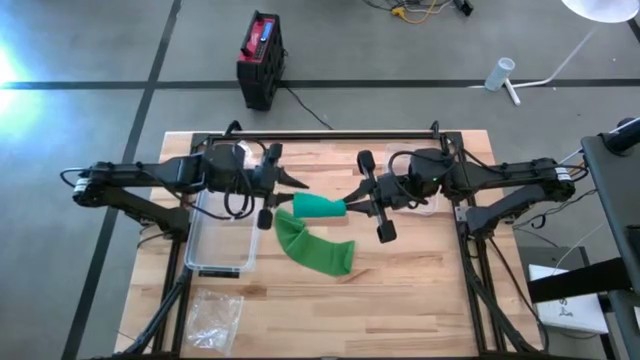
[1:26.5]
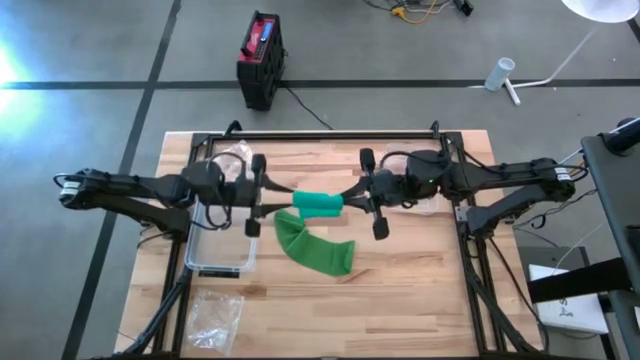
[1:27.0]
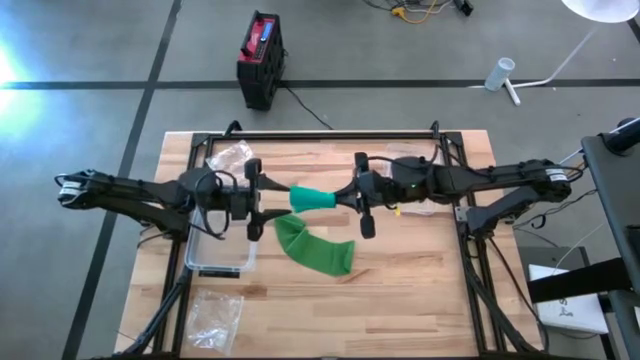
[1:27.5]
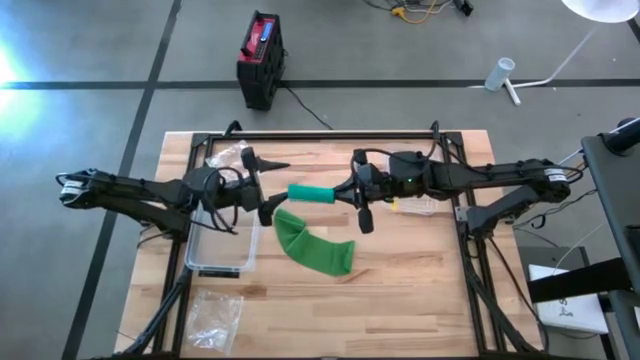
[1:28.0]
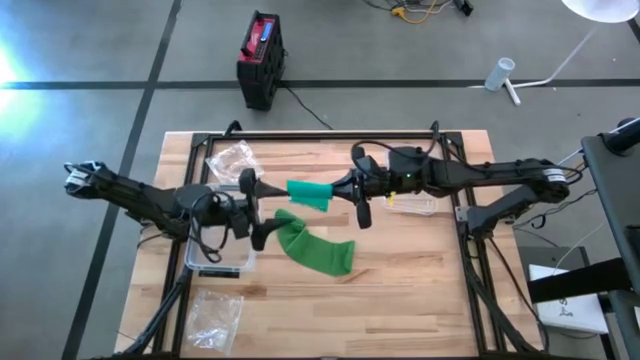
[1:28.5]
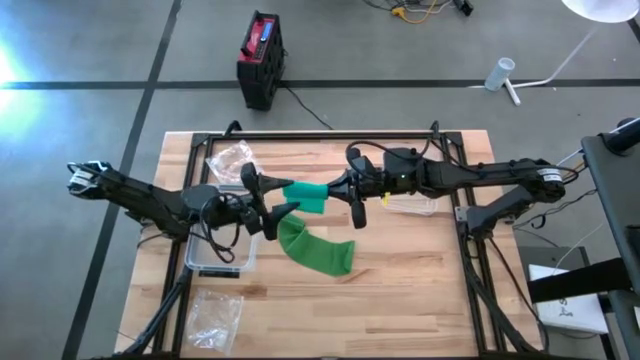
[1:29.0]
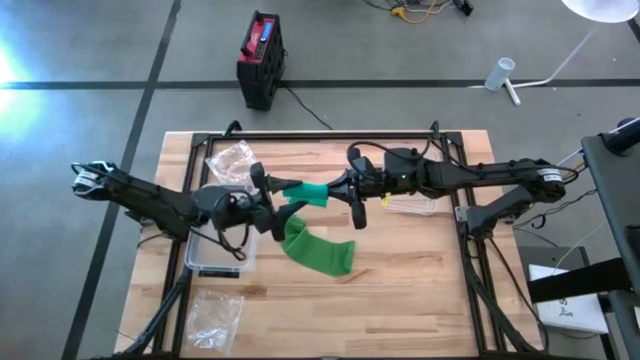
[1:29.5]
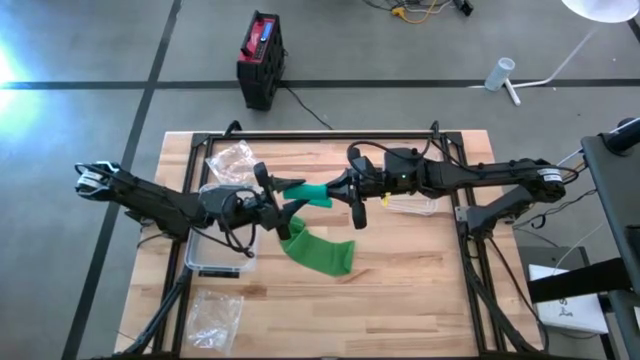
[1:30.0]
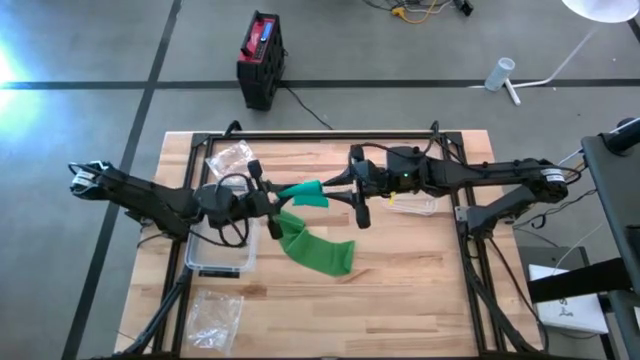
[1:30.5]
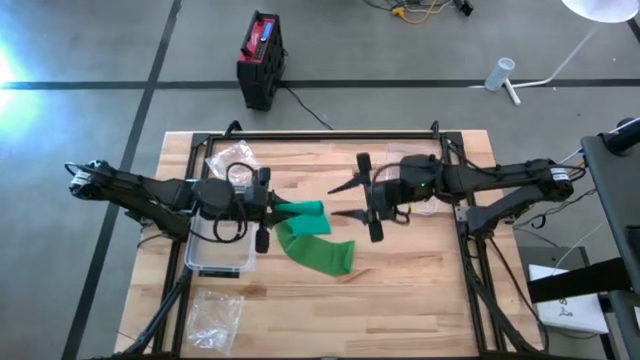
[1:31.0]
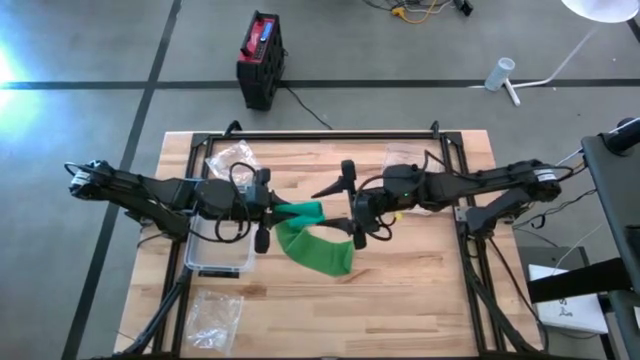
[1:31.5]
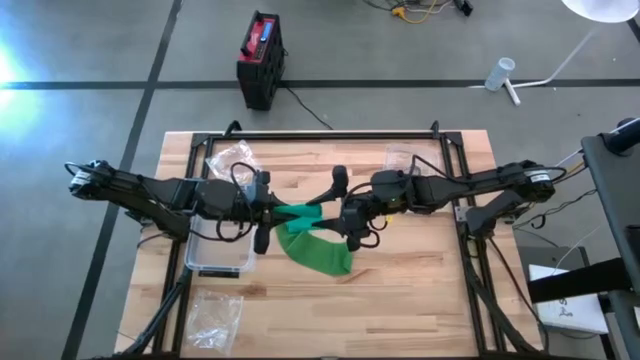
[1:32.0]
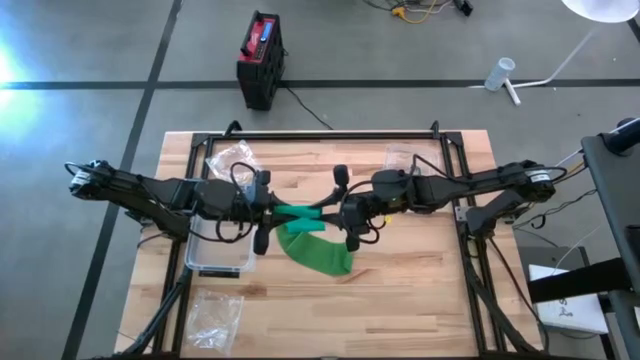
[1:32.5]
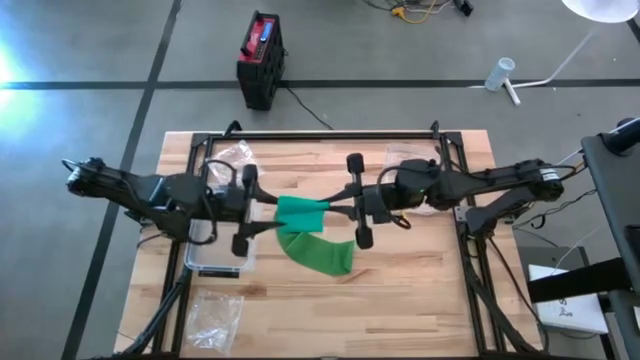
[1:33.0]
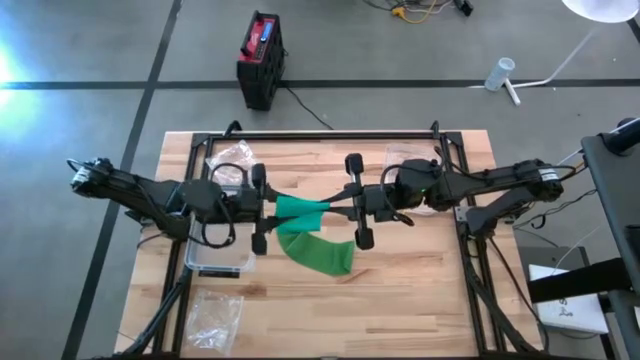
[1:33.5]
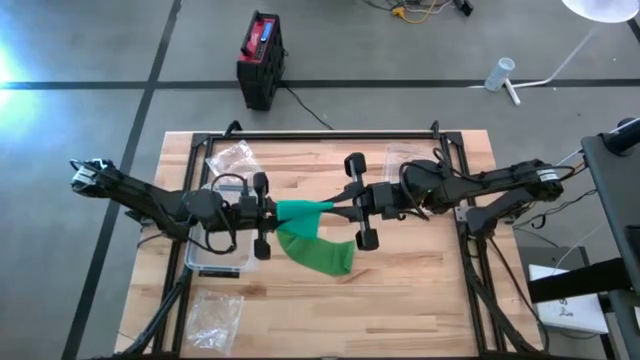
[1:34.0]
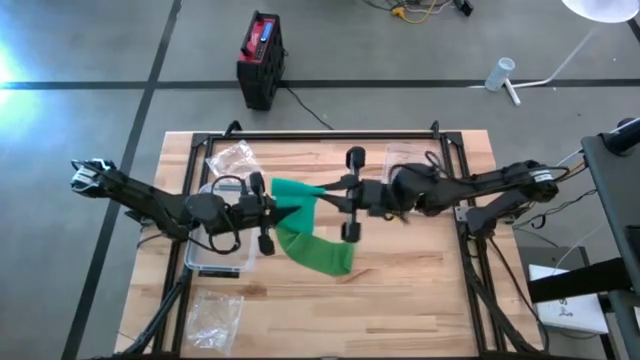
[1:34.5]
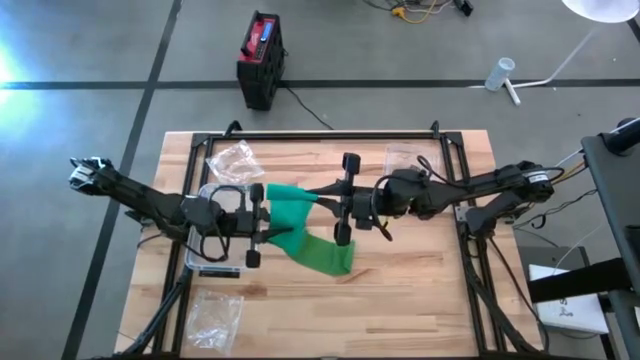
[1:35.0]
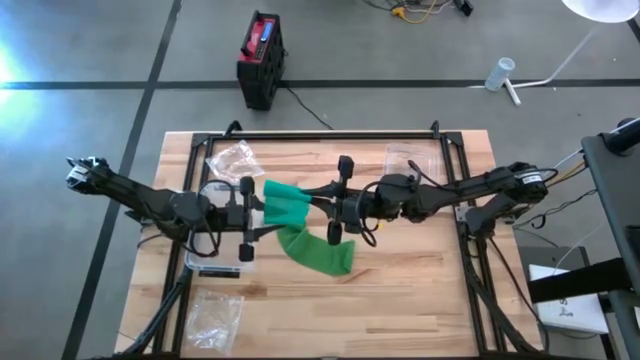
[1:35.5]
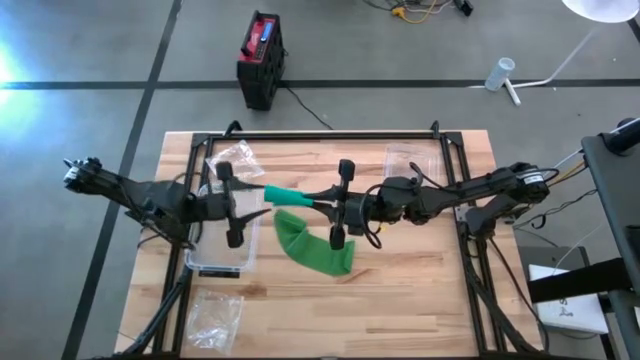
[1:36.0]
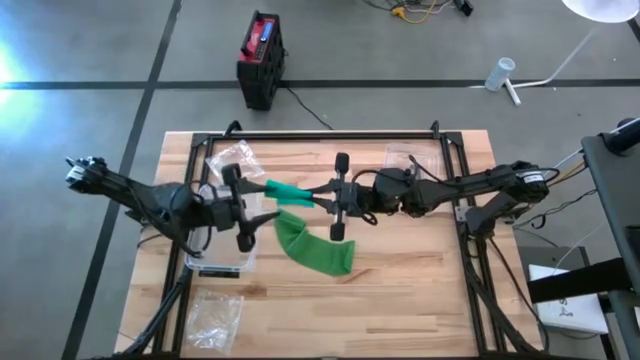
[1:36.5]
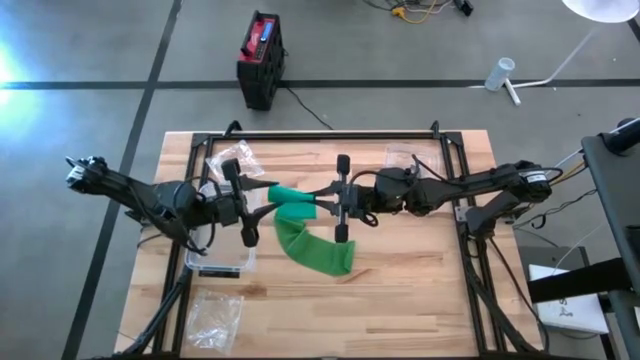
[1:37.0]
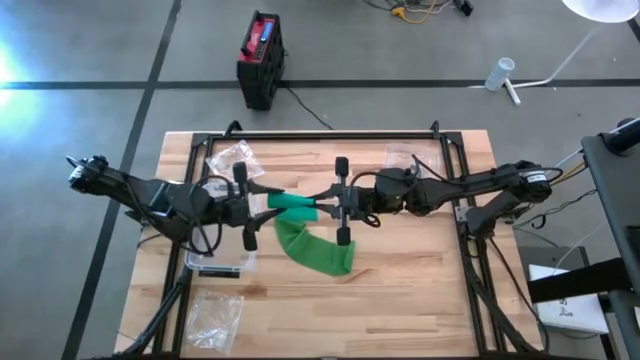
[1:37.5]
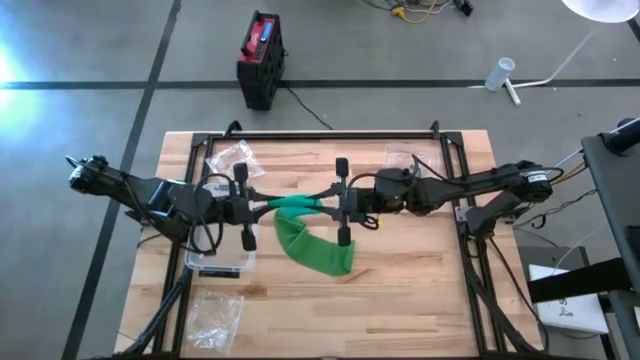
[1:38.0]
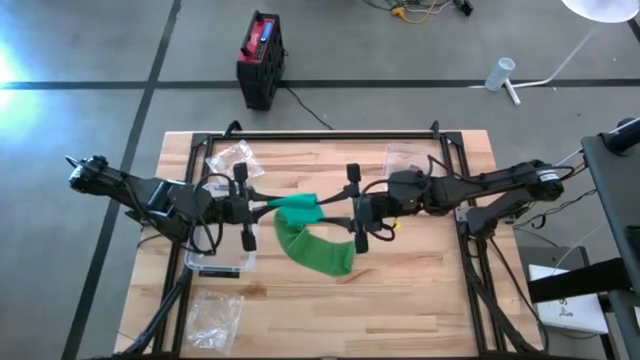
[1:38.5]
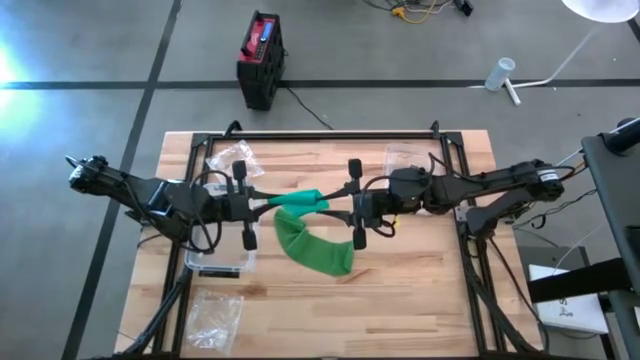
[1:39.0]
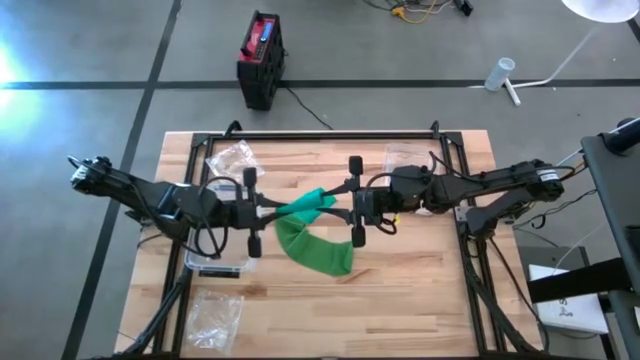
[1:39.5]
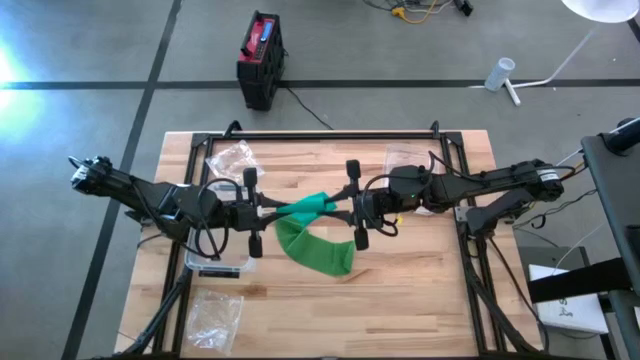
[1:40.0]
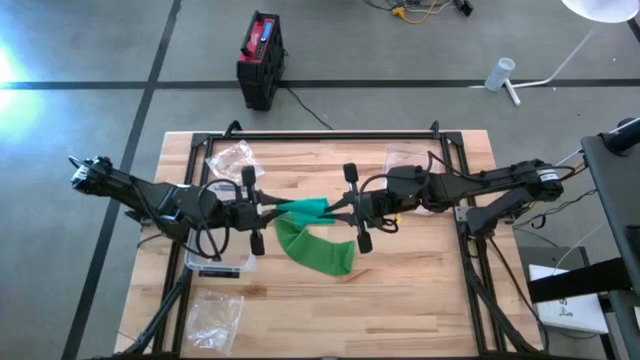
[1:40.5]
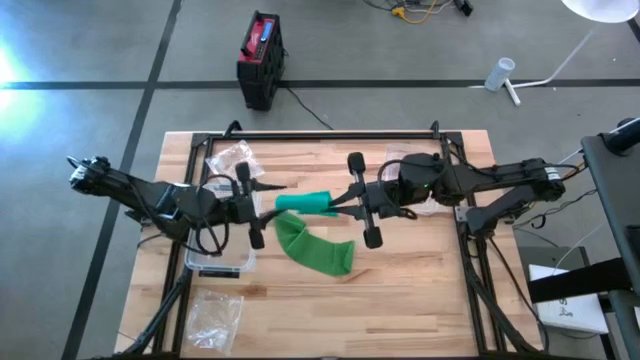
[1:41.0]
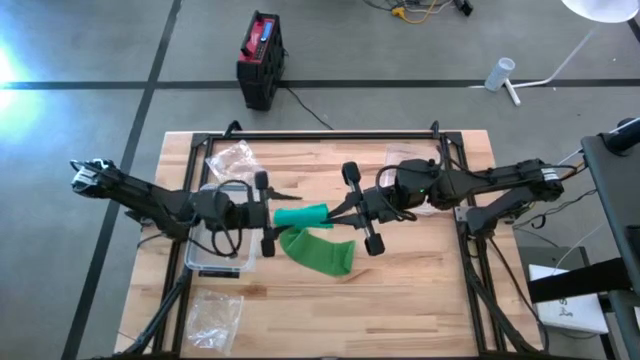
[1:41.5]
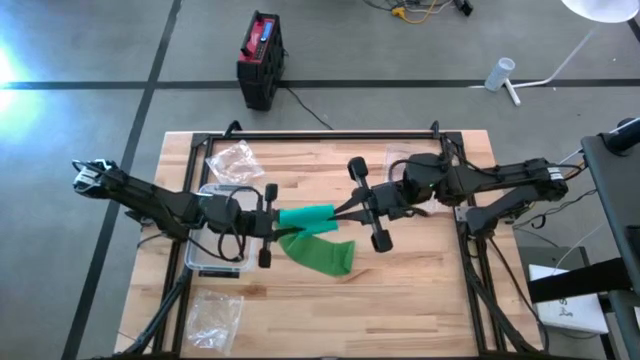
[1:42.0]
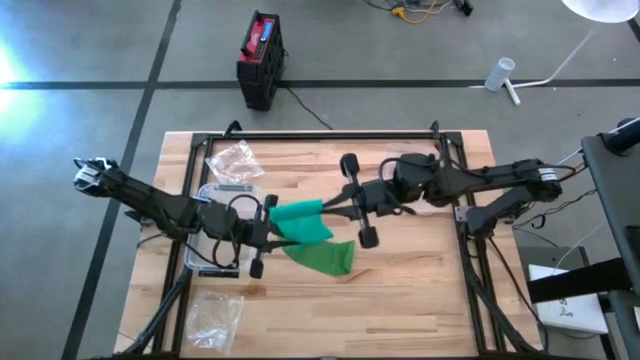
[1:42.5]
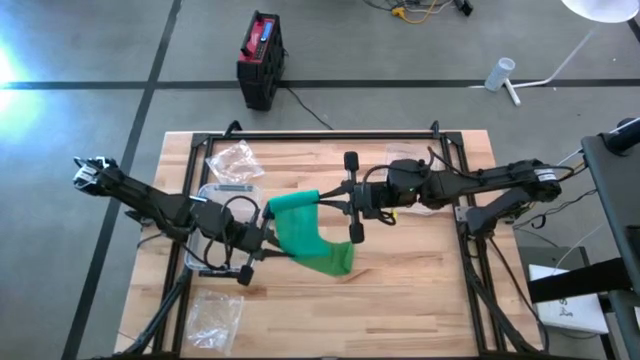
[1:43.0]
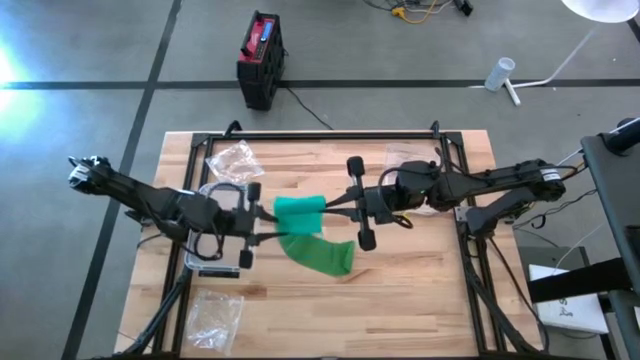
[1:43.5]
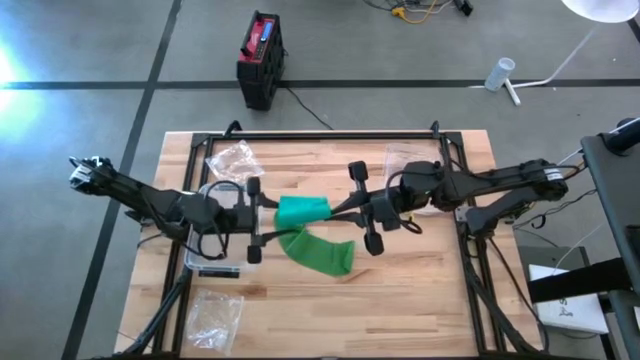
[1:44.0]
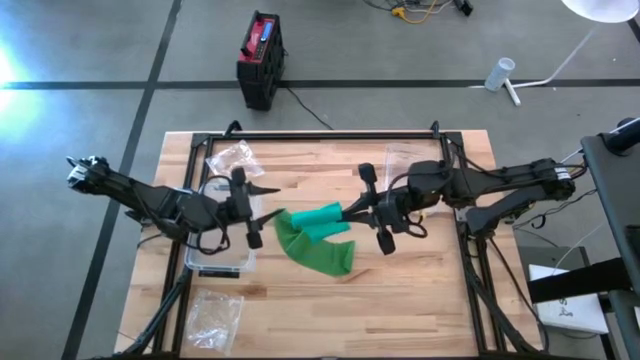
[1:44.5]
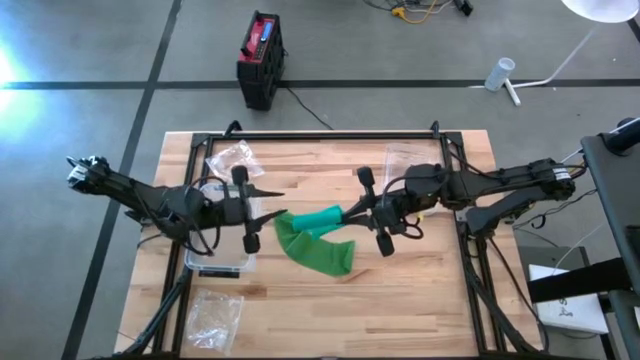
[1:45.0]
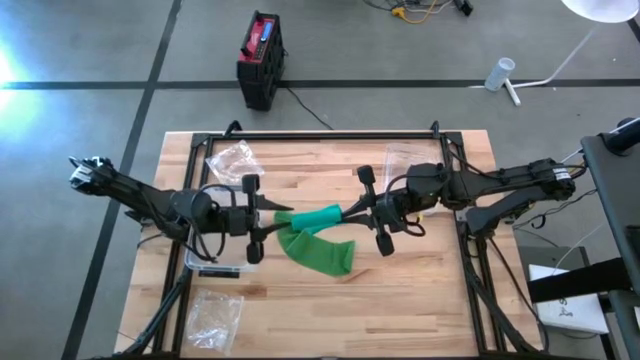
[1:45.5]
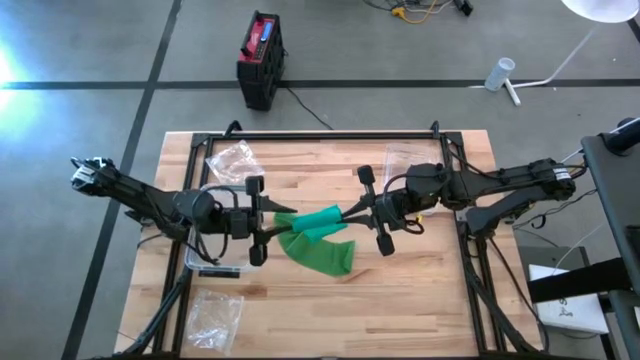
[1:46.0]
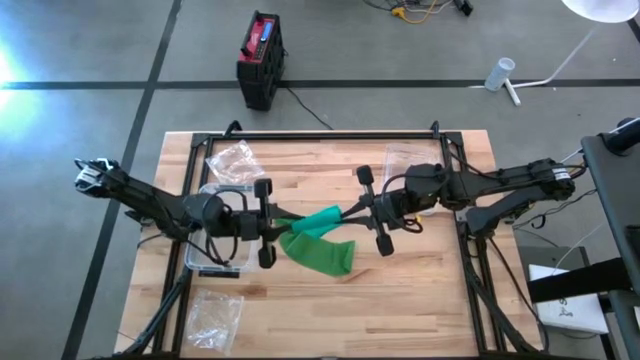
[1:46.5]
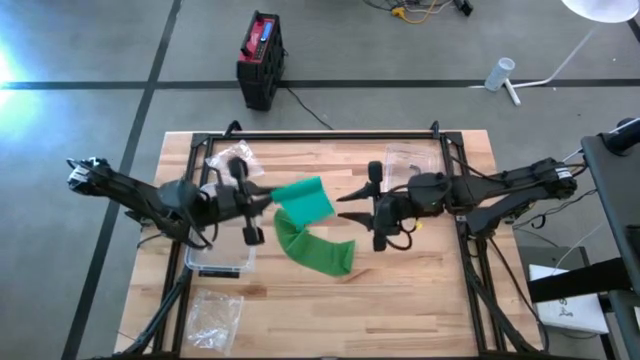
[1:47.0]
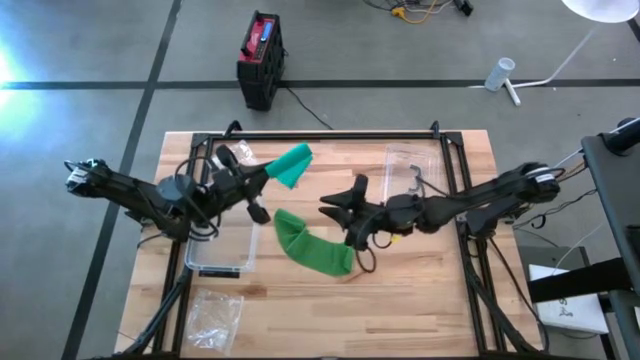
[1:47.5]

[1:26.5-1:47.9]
Task: Roll bandage
Roll the light green bandage
